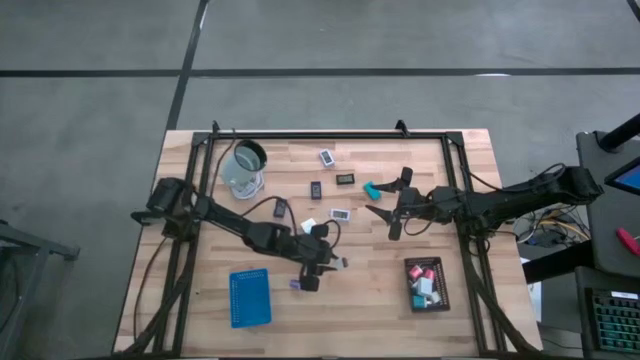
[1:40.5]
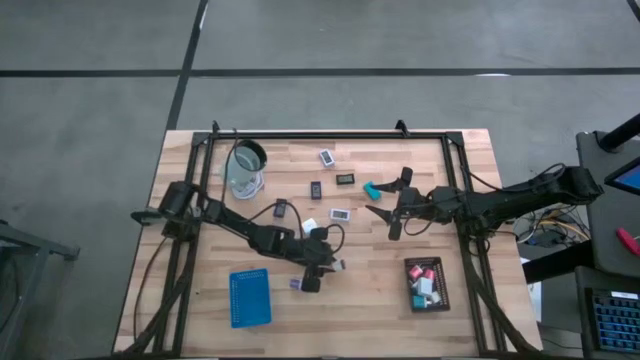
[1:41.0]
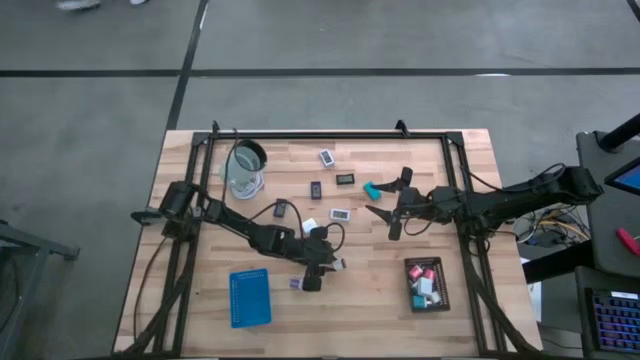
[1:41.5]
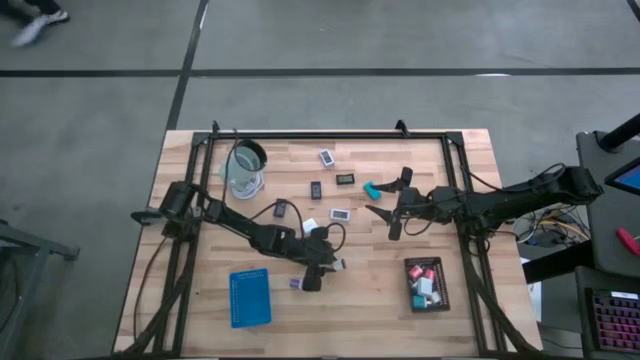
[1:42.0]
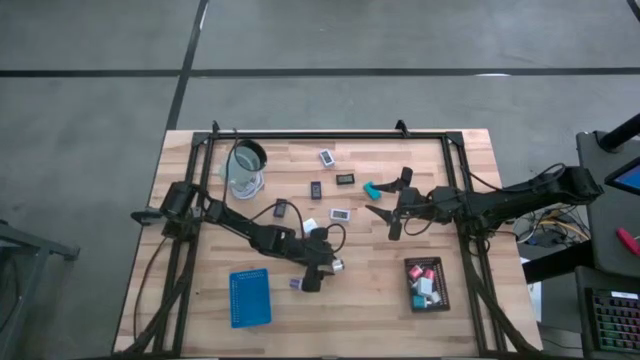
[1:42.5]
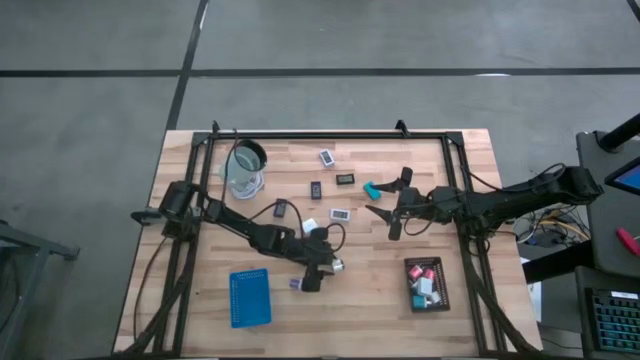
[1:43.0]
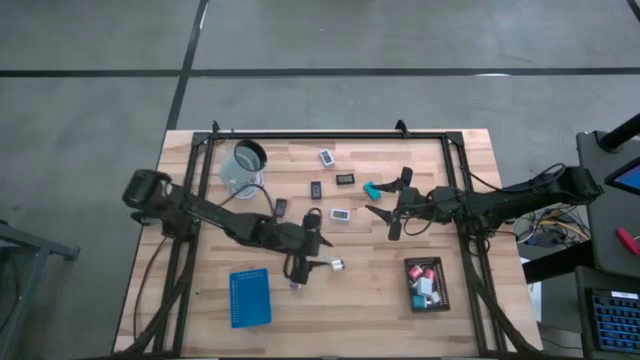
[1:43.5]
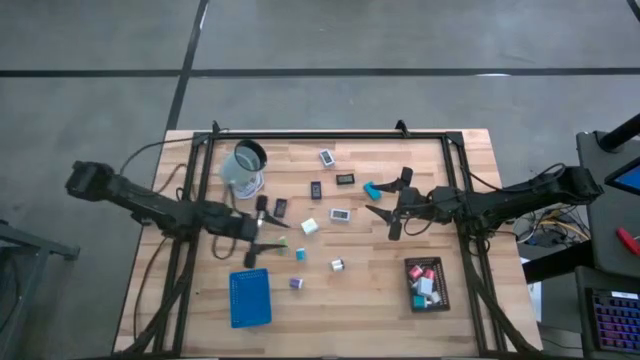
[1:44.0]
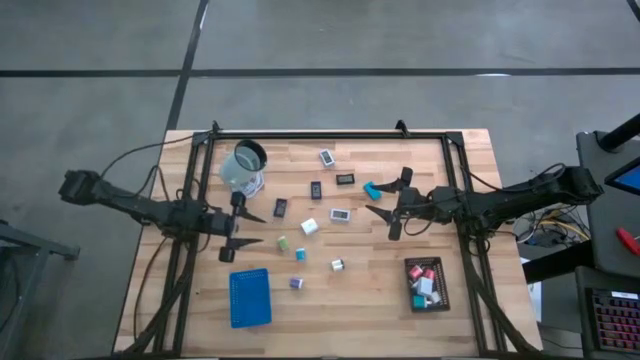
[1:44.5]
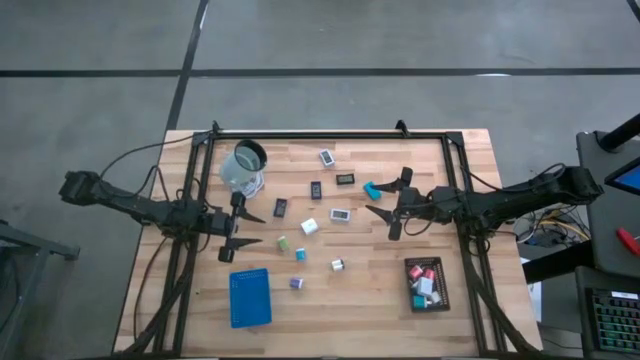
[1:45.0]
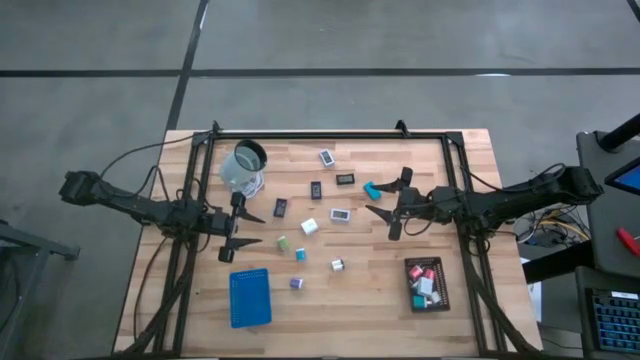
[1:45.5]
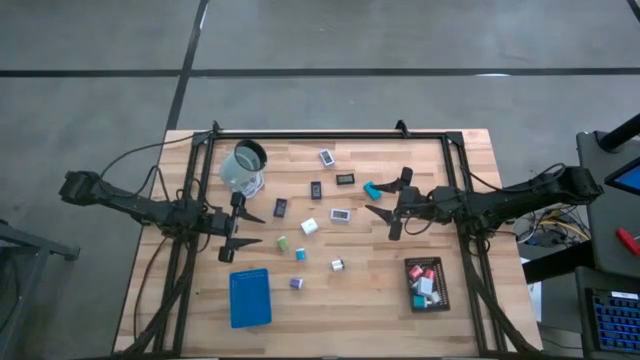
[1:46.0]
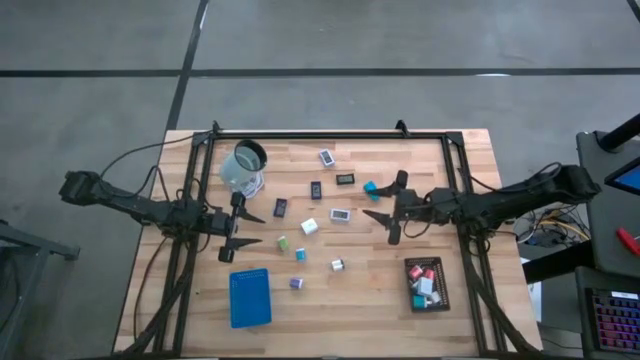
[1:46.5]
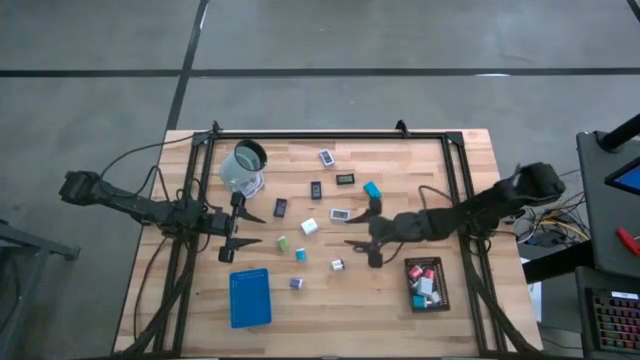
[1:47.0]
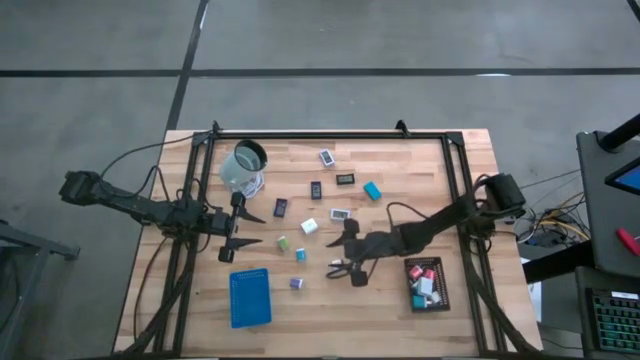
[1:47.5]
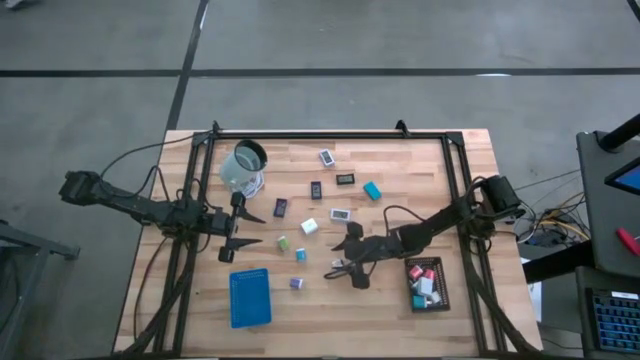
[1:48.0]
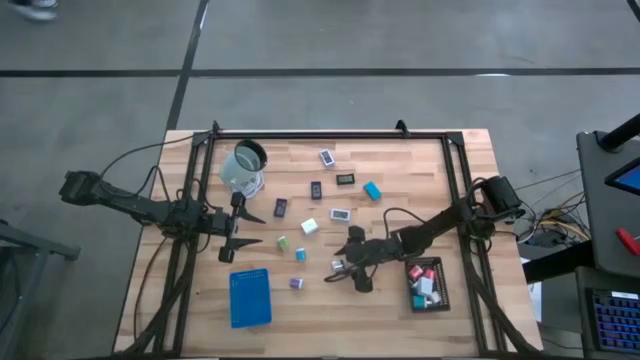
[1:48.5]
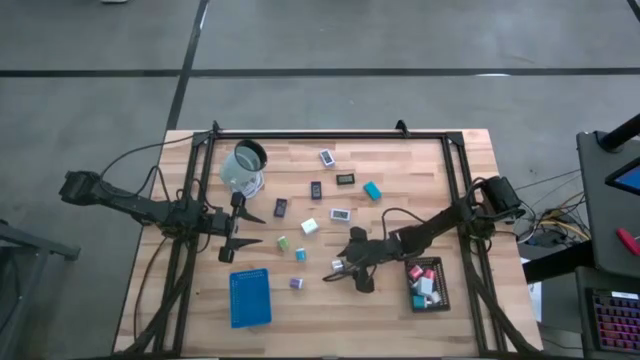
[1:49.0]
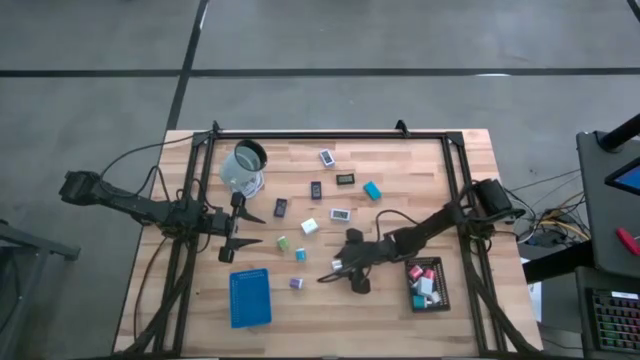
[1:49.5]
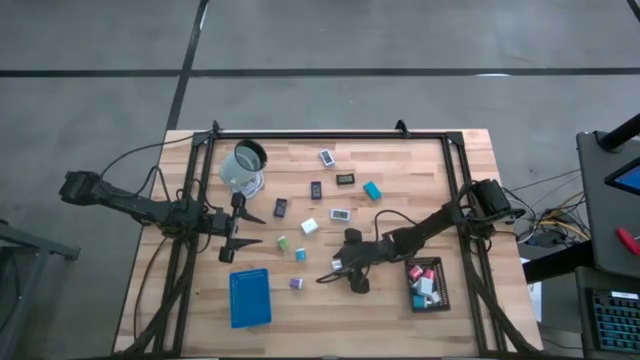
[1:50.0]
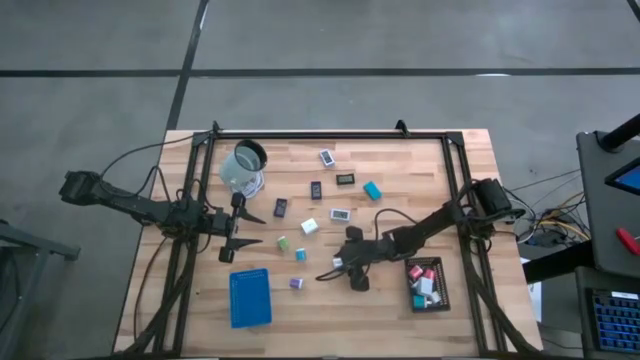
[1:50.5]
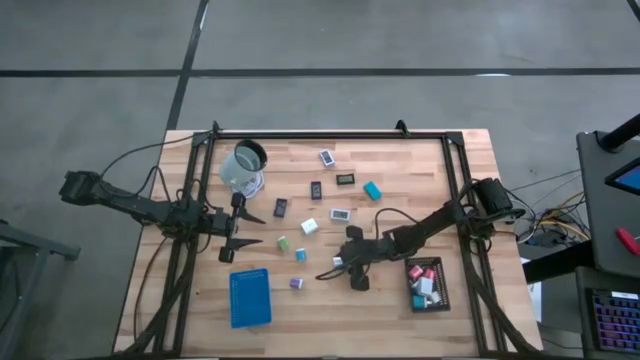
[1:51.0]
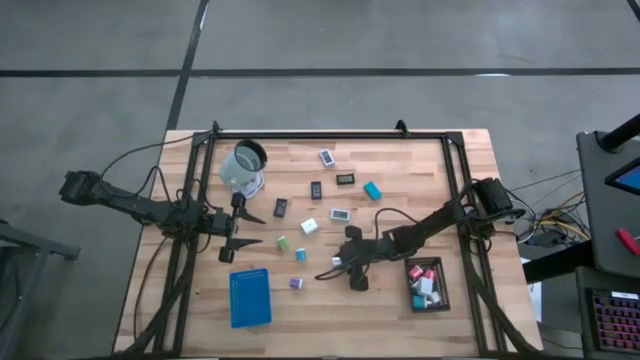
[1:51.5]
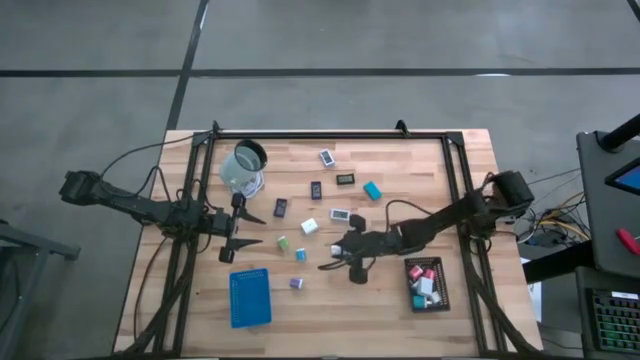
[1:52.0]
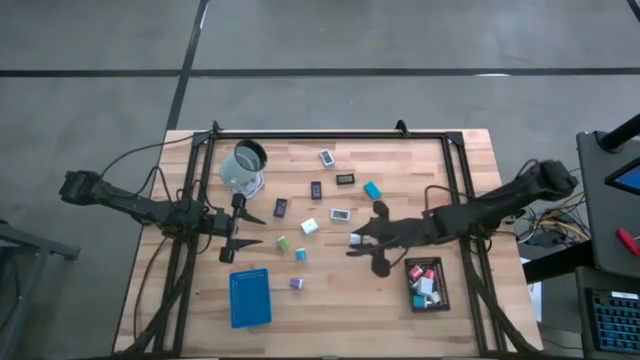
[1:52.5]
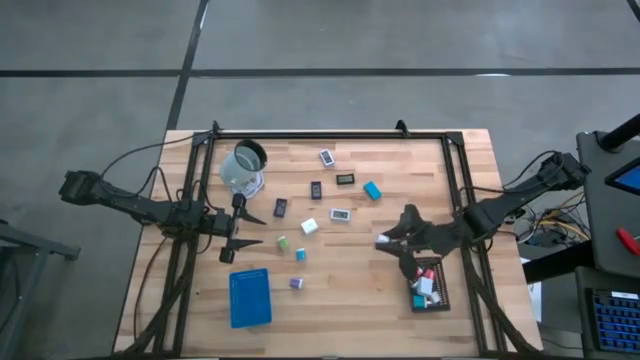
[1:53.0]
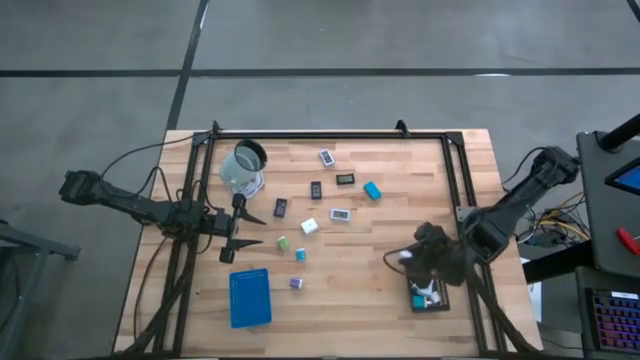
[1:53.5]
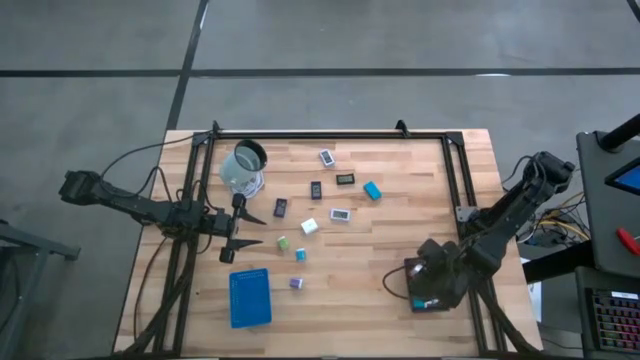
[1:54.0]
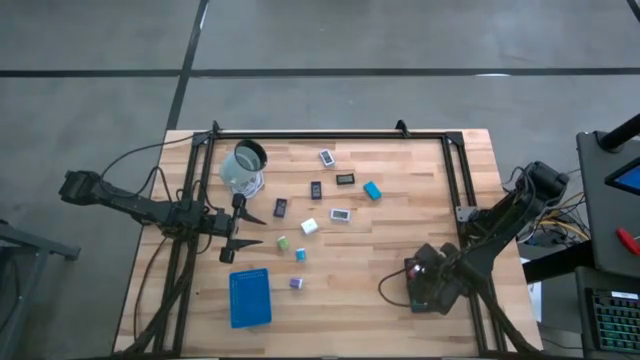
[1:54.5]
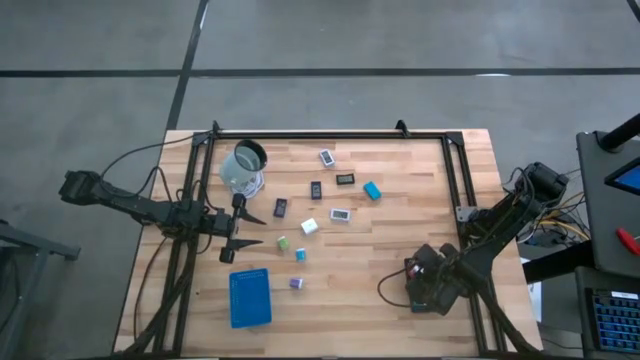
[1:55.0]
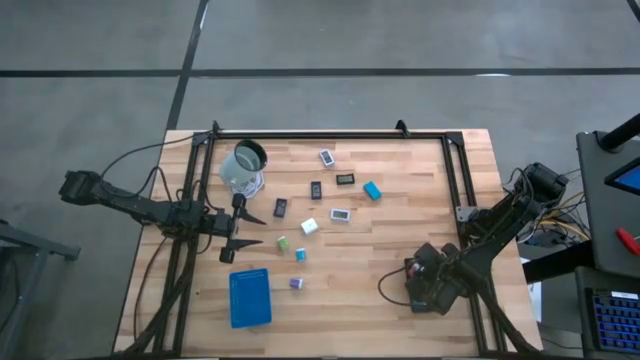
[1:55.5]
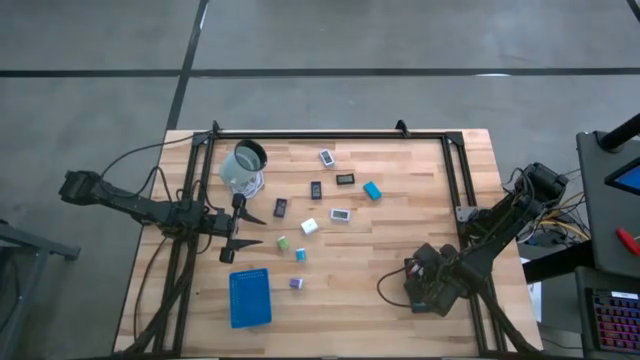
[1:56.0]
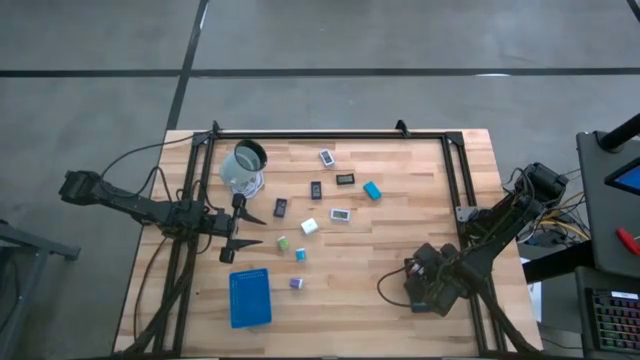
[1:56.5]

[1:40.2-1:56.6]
Task: Pick & Place Office items
Put the white black charger adapter into the black bin

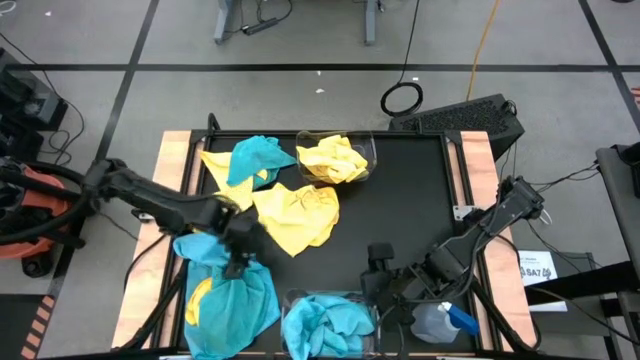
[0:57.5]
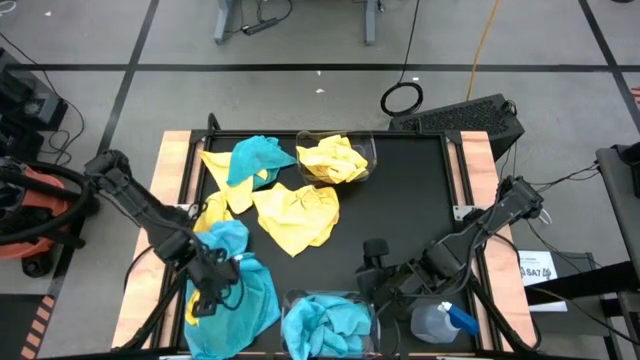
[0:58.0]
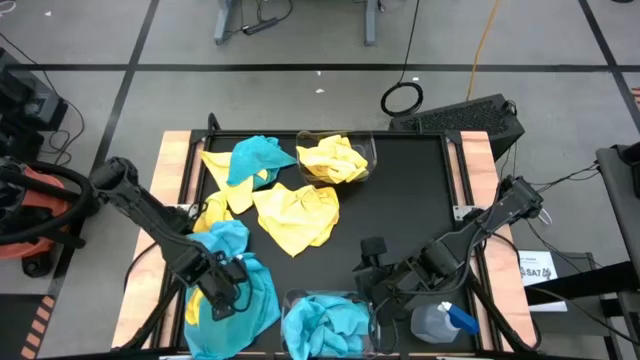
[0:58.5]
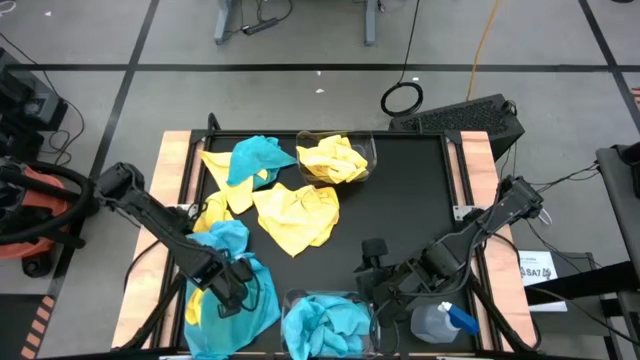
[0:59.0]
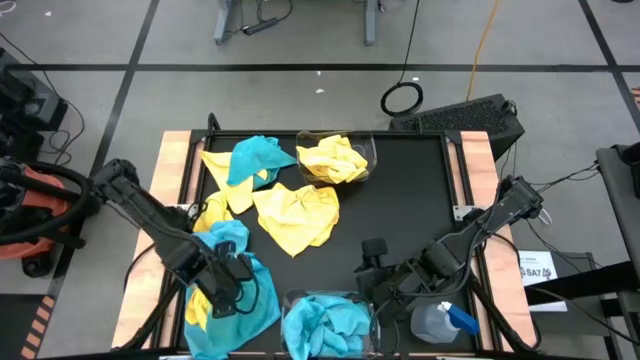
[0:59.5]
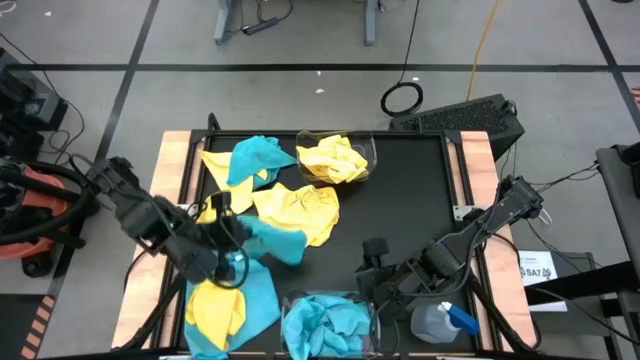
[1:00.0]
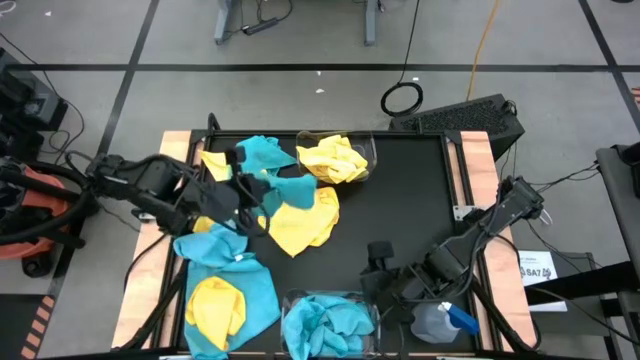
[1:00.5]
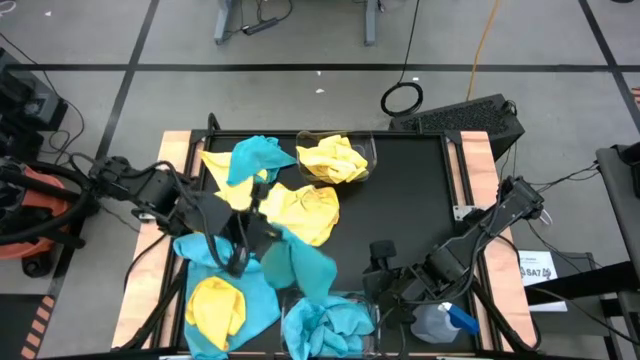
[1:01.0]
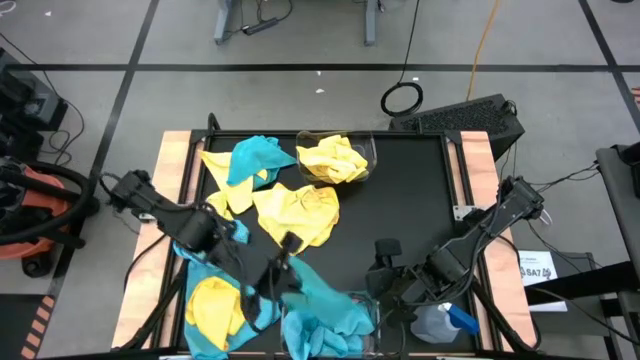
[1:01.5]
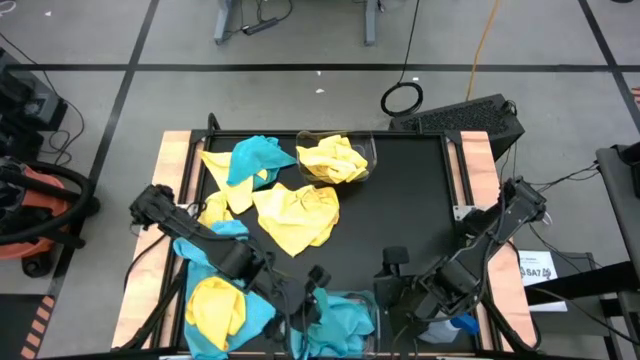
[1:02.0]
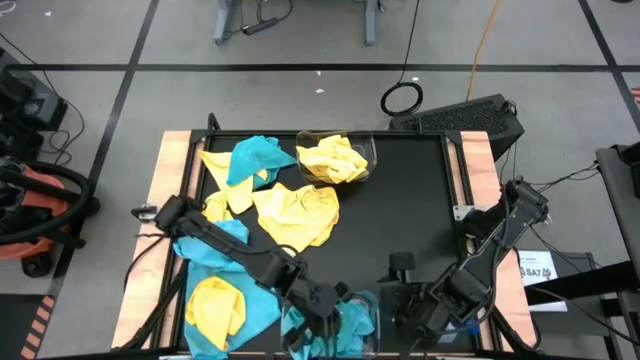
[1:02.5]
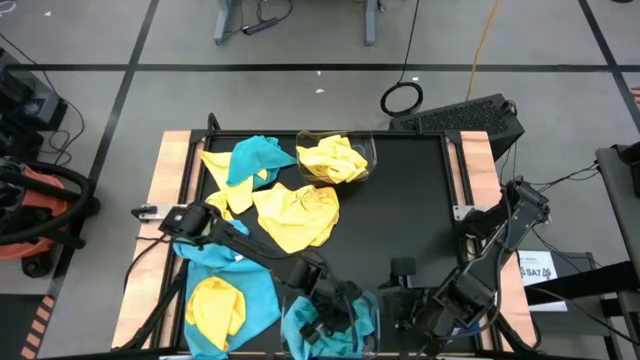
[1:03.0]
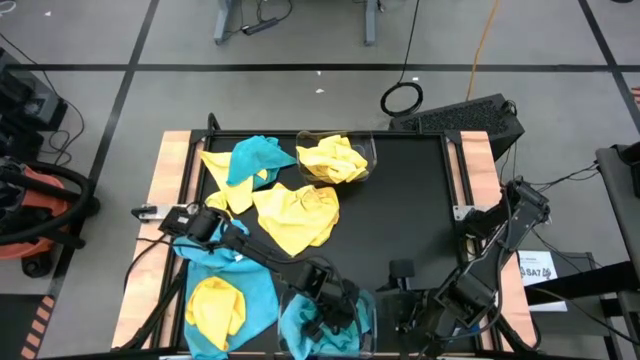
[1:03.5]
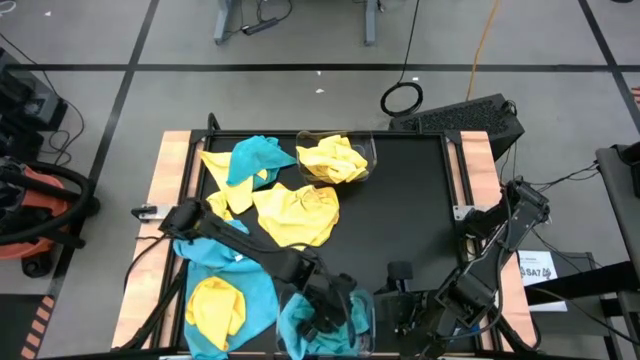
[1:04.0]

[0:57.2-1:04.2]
Task: Sort microfiber towel by color & place in baskets
Put the blue towel into the bottom transparent bin
